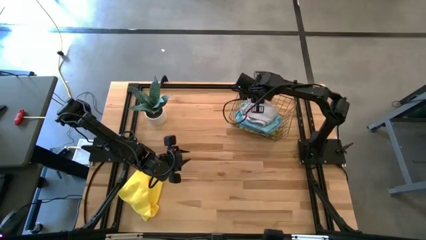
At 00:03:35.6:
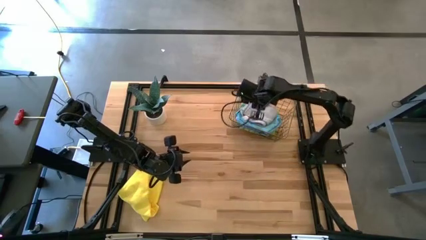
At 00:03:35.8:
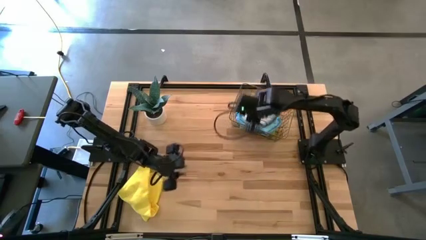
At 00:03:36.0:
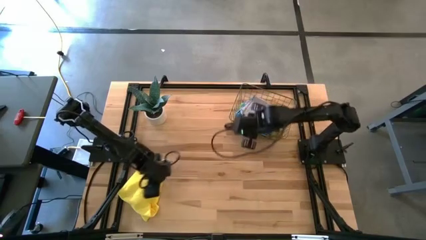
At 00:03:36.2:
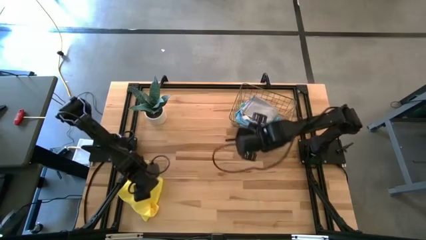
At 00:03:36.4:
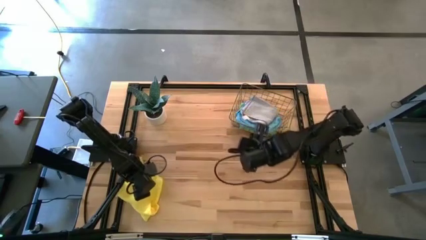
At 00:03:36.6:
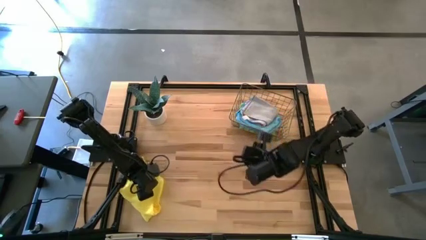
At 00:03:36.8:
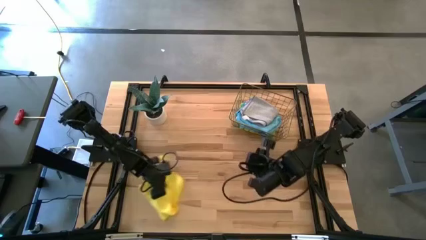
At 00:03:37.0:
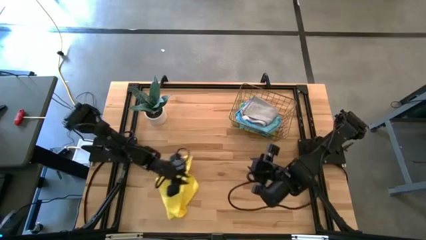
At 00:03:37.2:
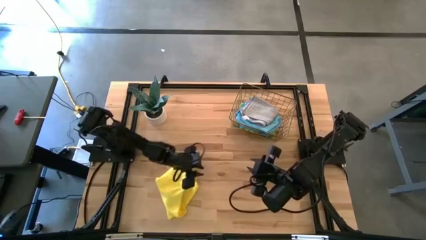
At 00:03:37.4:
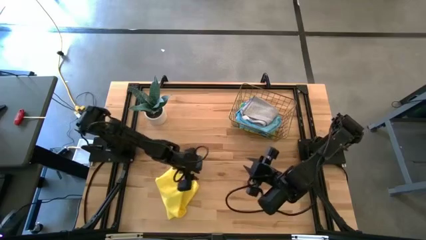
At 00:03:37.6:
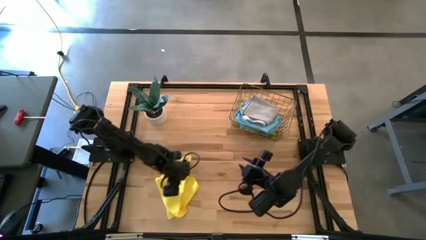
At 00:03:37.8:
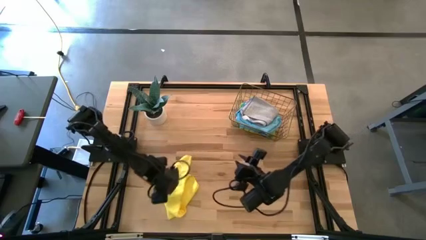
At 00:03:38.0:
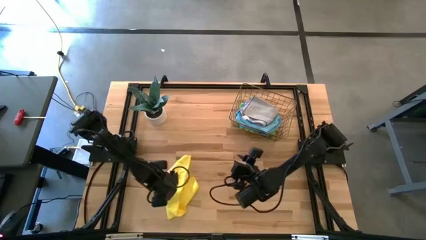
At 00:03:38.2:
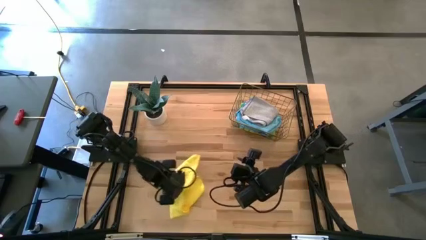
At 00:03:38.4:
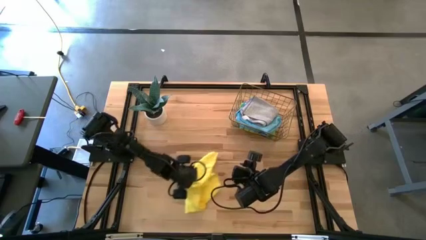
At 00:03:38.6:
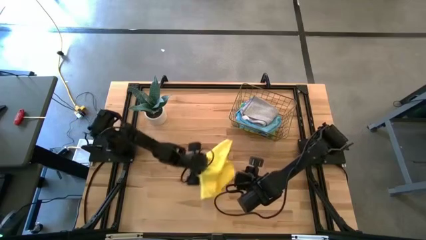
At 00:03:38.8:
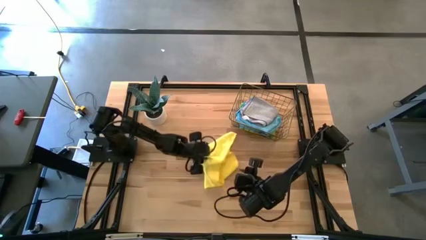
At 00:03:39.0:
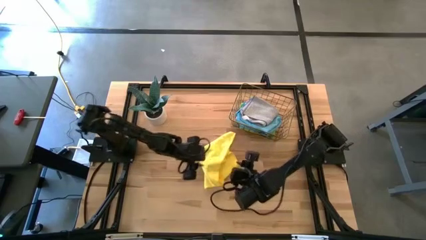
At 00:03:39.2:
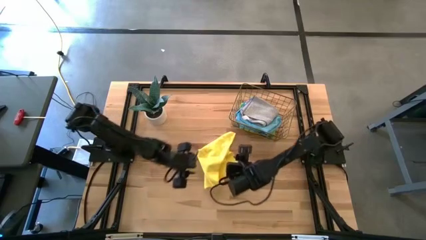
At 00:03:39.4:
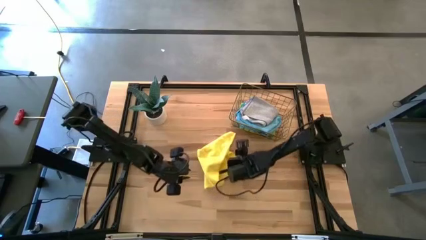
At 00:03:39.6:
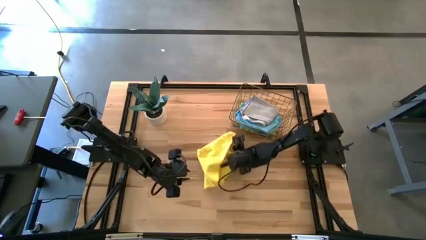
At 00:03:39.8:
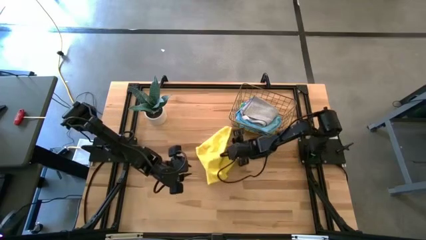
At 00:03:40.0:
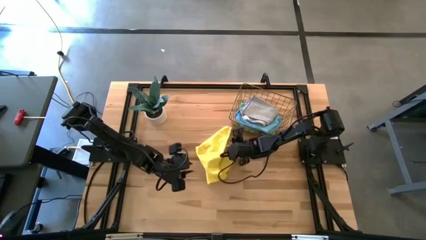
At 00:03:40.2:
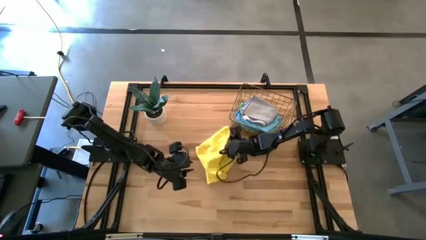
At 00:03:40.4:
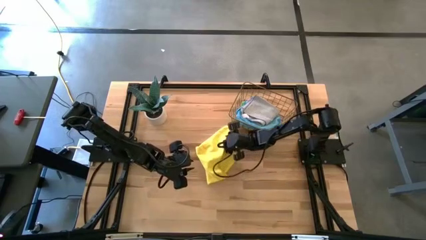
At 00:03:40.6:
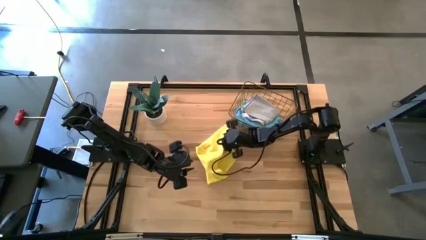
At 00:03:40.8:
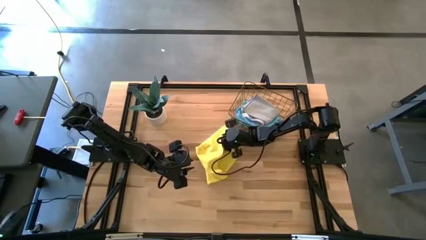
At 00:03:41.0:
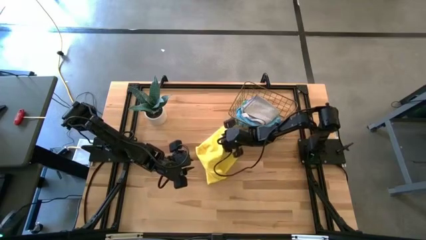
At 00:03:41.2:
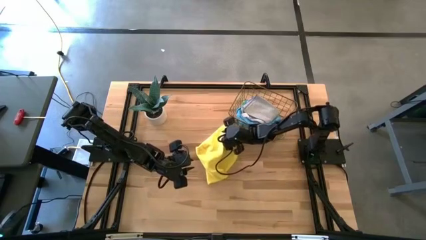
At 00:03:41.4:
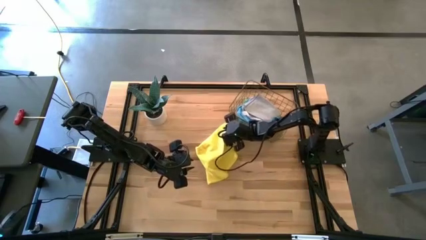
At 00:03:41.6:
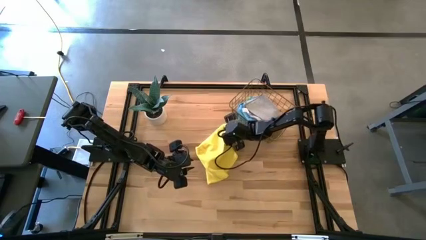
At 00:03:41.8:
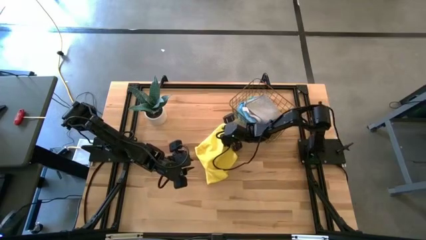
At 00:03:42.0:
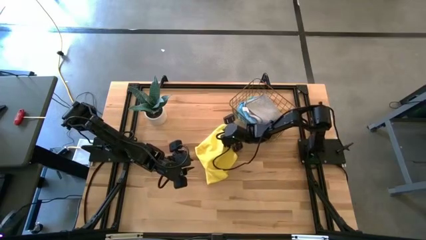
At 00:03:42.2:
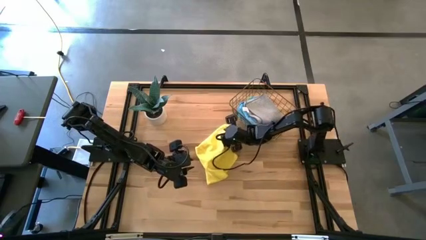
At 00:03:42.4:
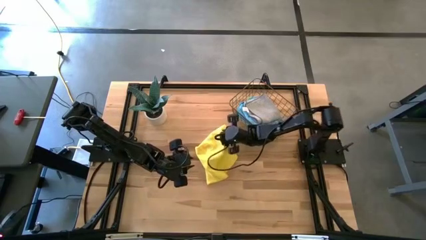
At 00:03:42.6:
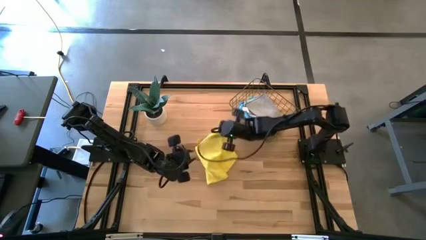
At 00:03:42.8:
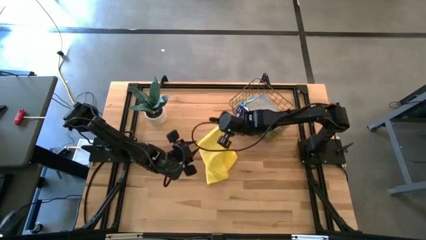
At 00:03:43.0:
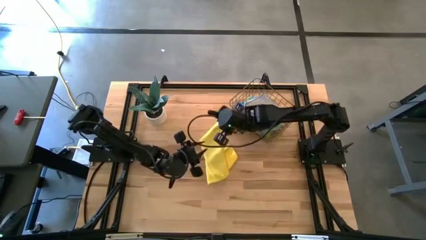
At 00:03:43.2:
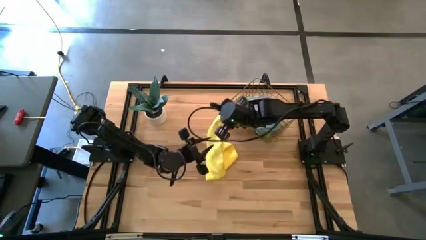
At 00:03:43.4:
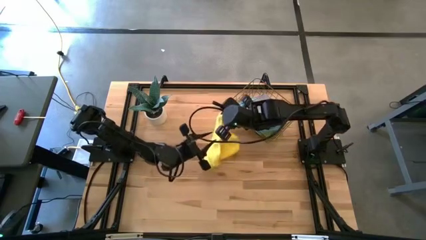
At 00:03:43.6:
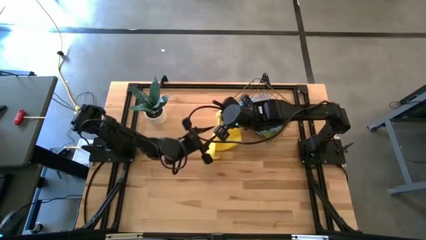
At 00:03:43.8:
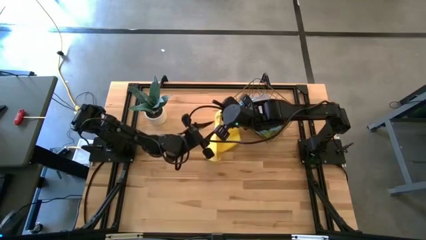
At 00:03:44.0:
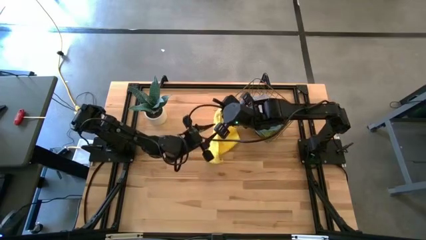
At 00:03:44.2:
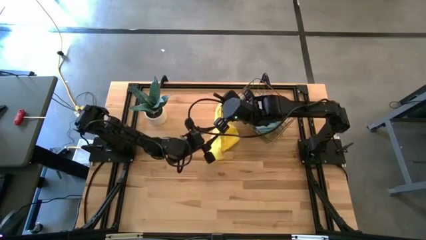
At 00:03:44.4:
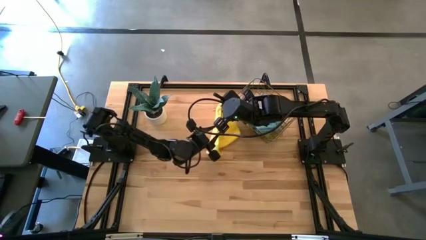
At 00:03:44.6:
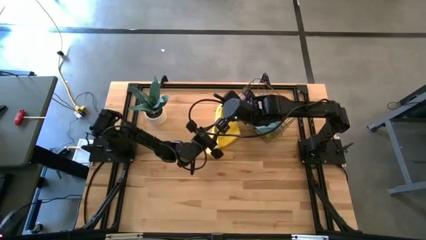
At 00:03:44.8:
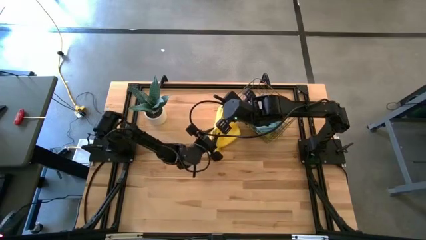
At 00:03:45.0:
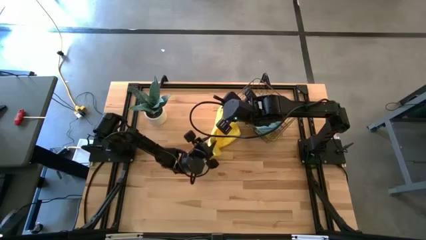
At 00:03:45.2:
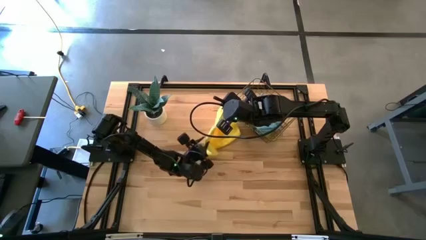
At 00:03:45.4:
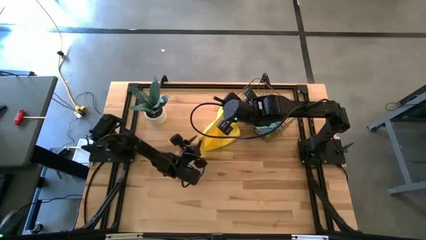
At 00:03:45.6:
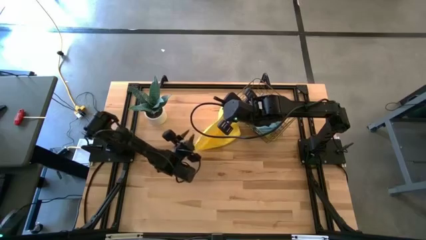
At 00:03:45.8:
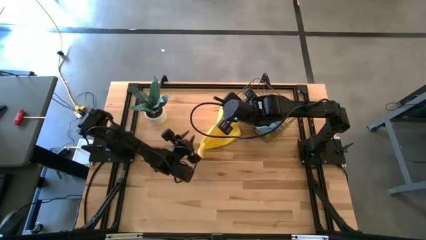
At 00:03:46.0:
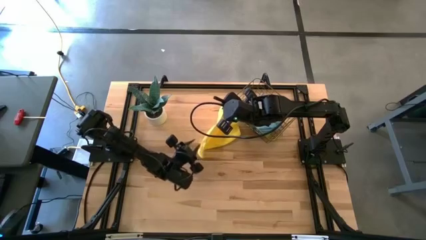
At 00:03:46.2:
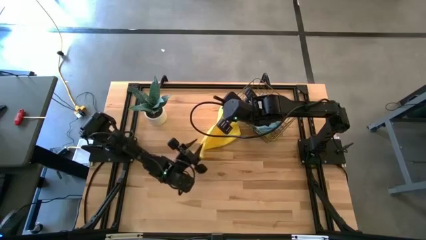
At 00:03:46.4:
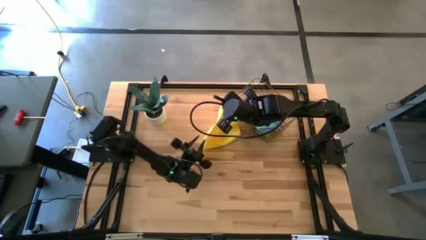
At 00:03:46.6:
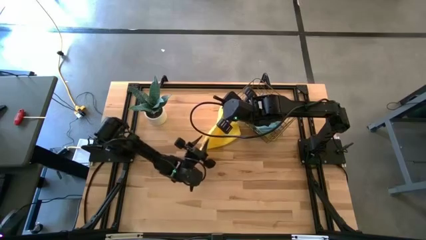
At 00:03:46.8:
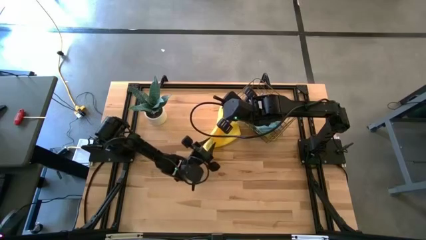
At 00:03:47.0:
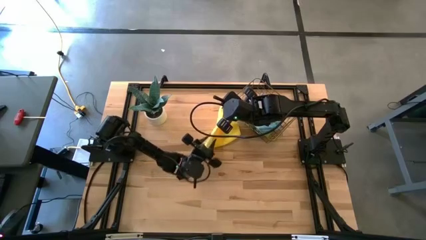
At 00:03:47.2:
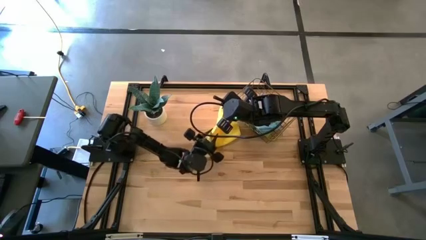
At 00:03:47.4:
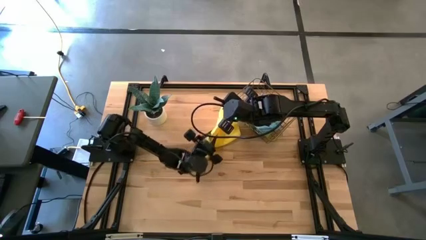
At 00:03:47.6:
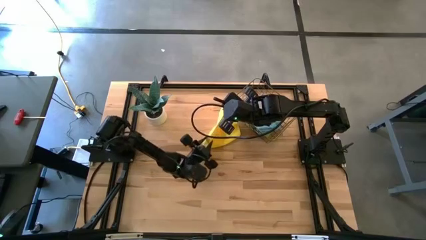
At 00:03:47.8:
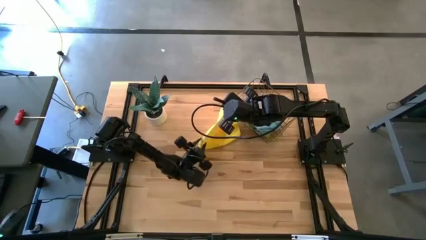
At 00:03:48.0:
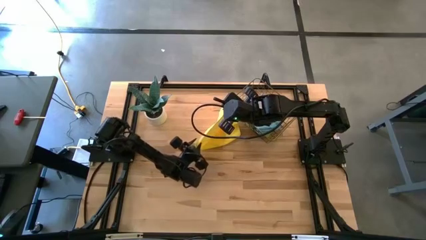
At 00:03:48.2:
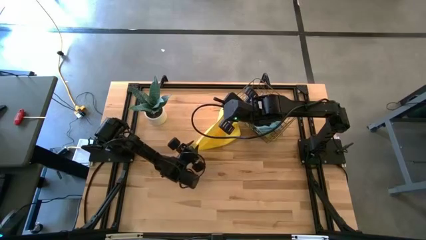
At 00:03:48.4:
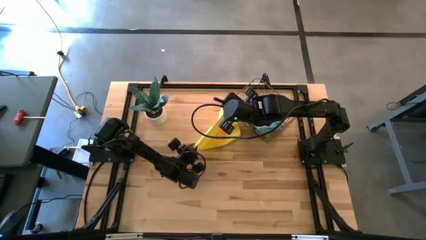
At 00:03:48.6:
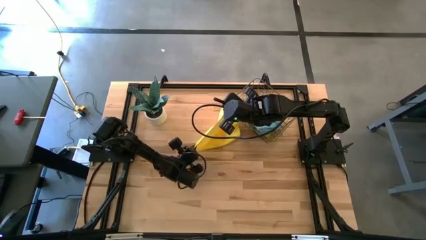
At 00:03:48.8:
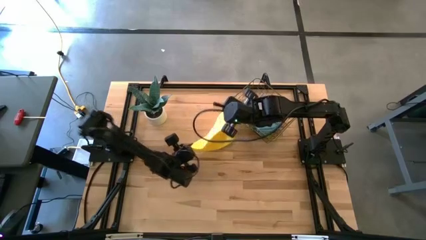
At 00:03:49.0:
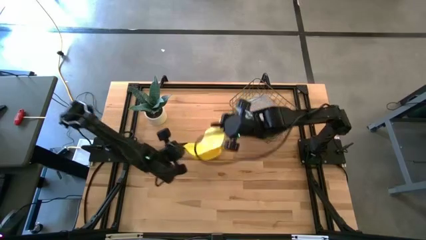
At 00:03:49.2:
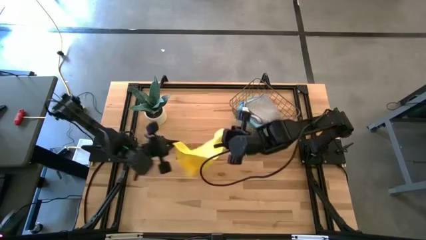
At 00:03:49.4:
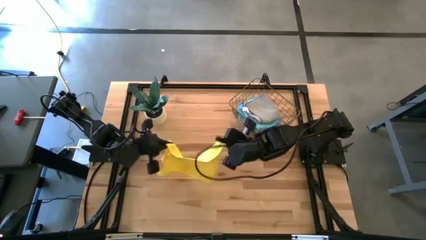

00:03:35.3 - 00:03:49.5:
Task: Fold microfiber towels
Fold the yellow microfiber towel
